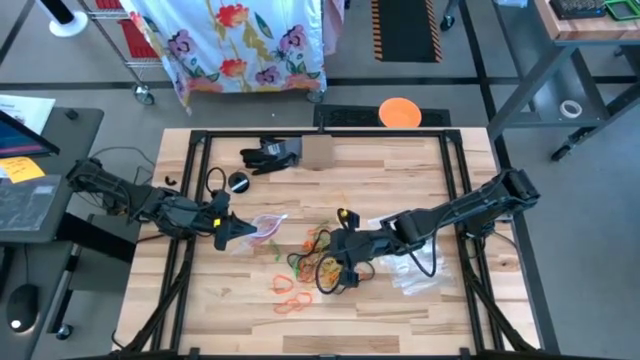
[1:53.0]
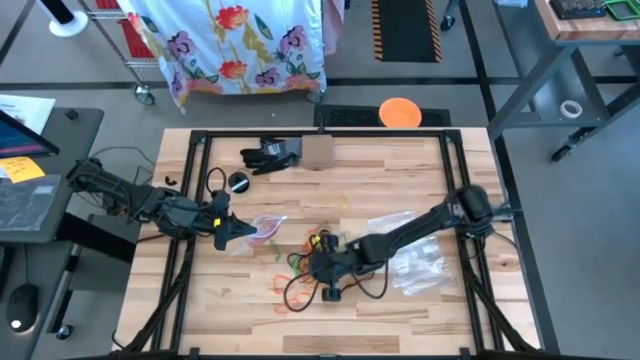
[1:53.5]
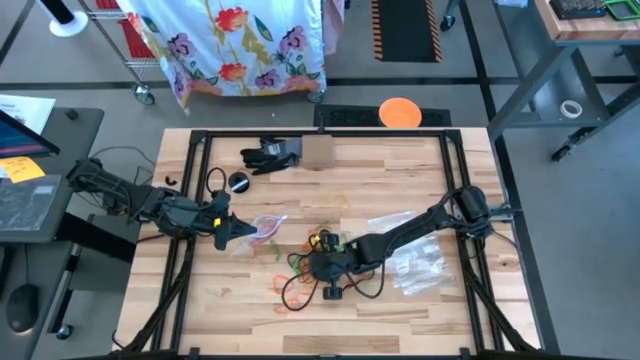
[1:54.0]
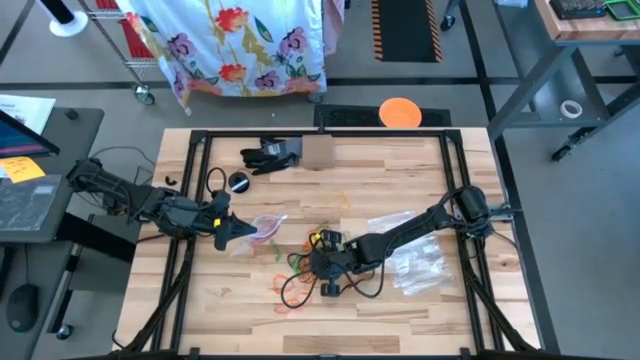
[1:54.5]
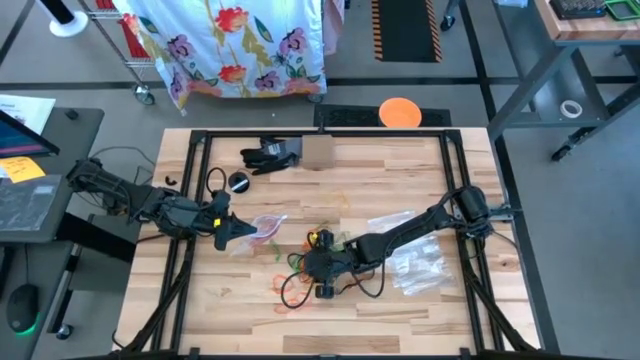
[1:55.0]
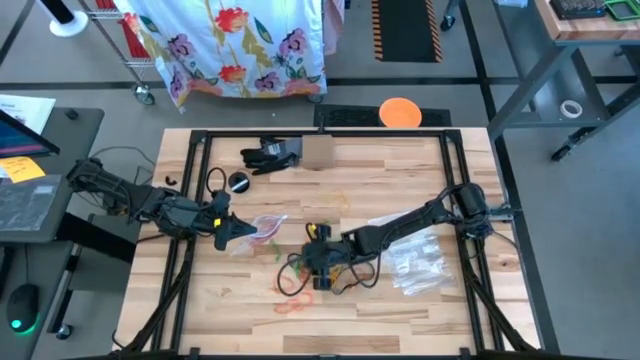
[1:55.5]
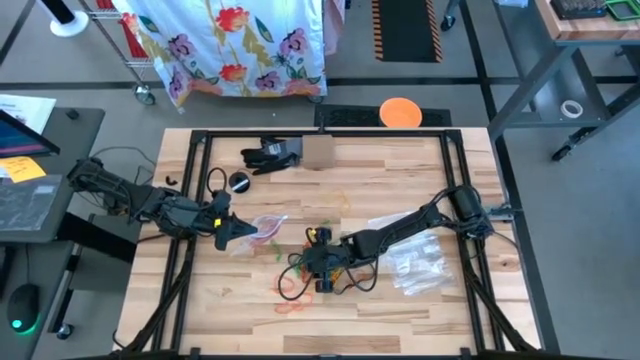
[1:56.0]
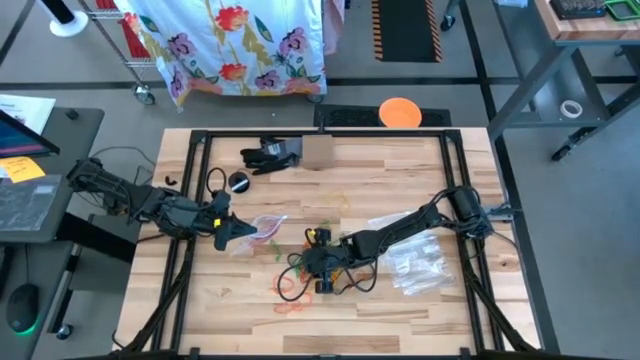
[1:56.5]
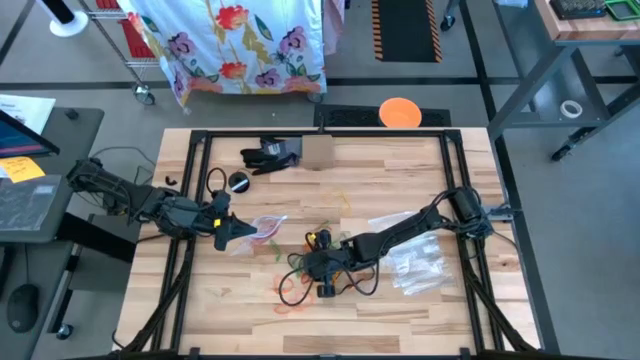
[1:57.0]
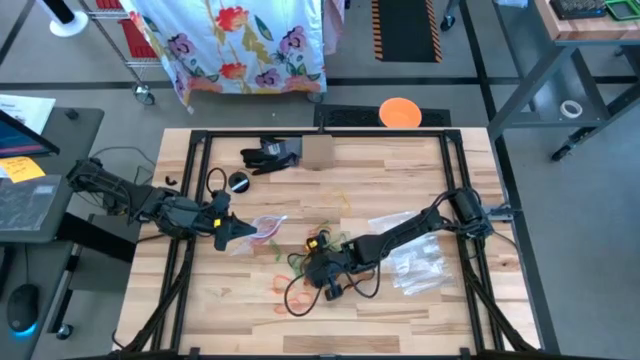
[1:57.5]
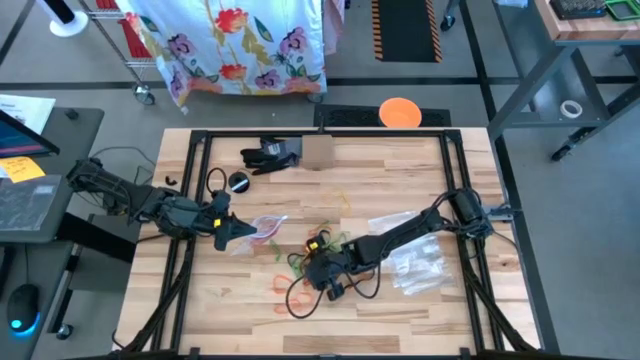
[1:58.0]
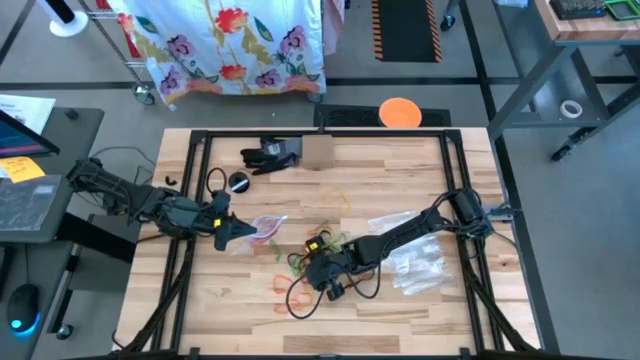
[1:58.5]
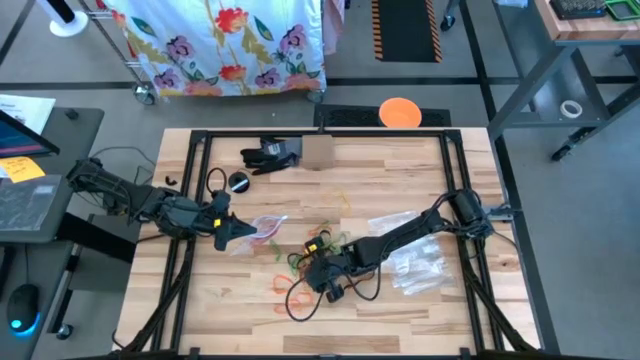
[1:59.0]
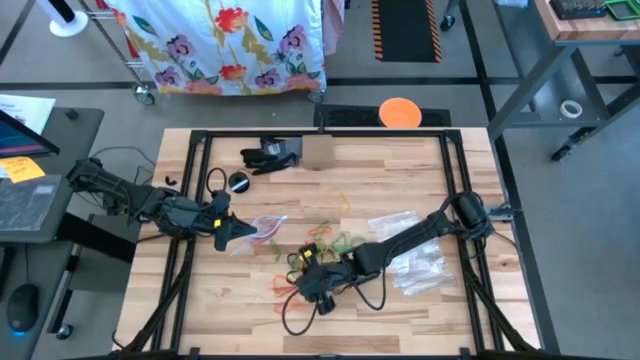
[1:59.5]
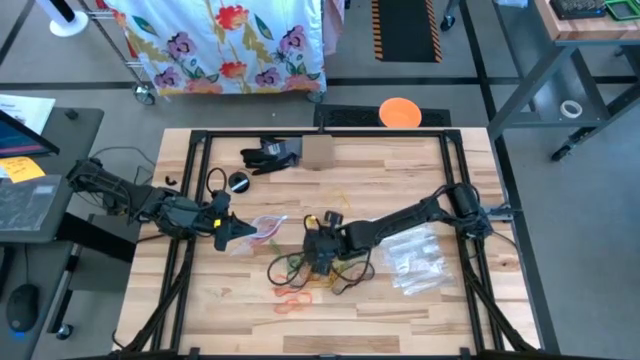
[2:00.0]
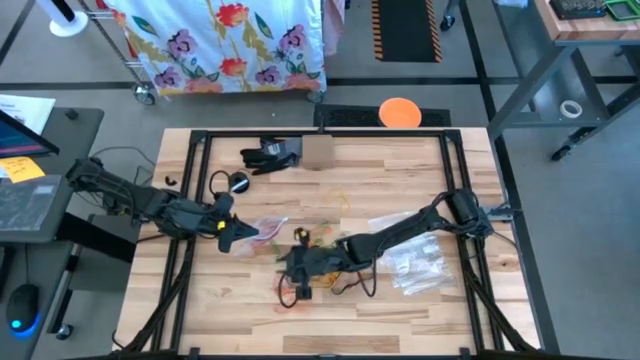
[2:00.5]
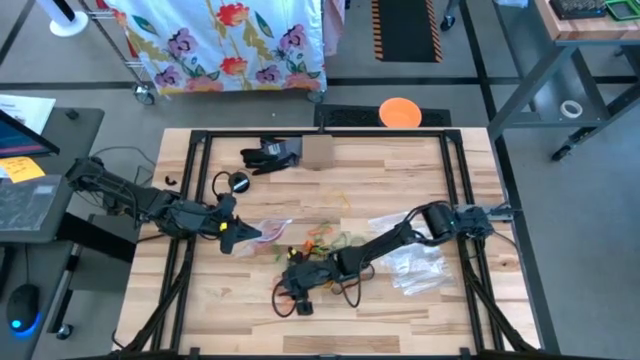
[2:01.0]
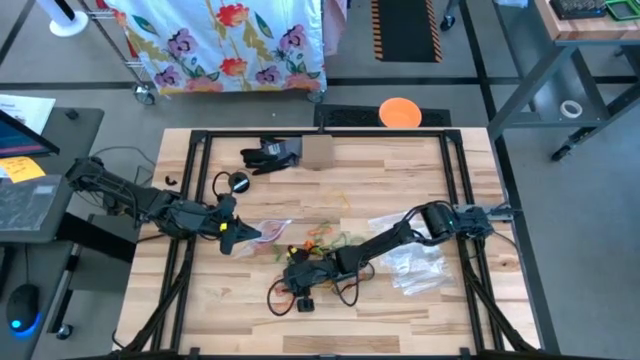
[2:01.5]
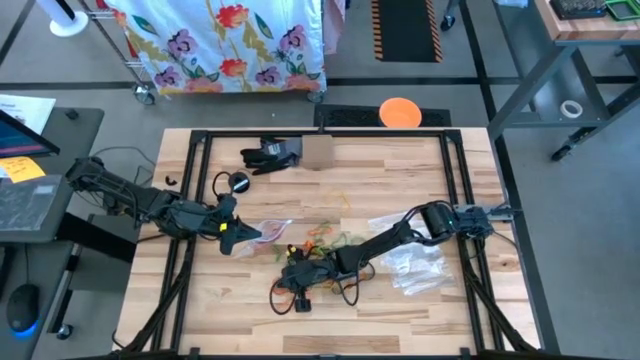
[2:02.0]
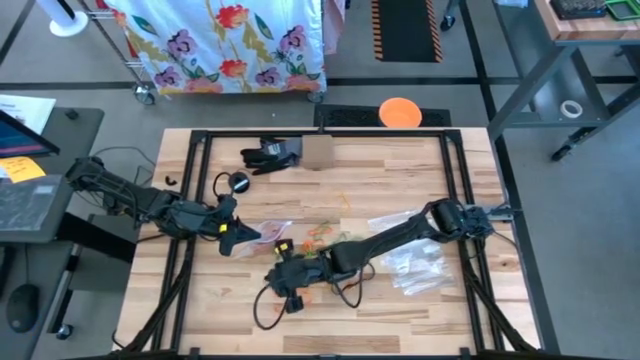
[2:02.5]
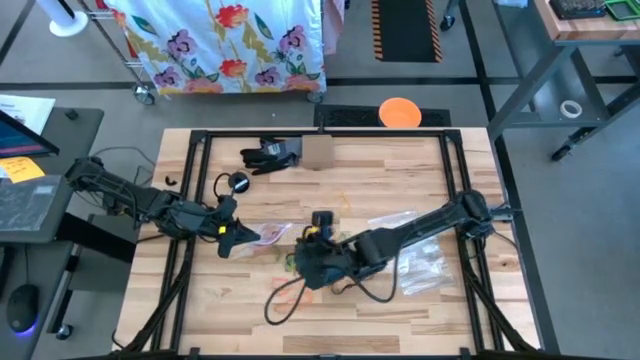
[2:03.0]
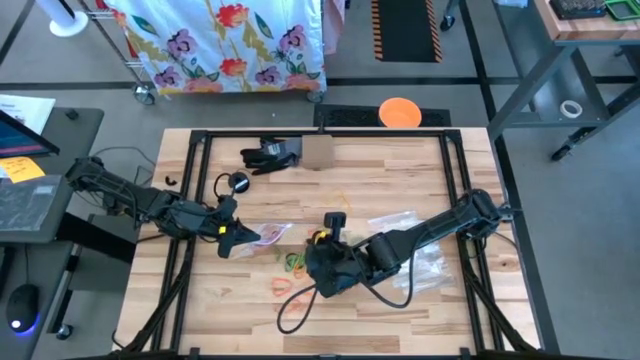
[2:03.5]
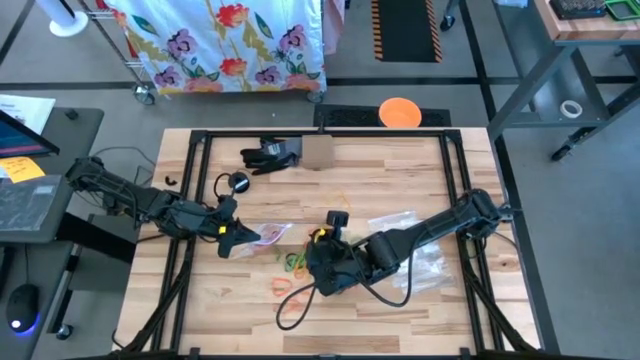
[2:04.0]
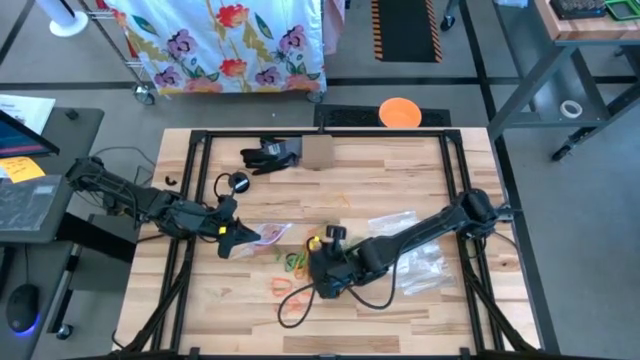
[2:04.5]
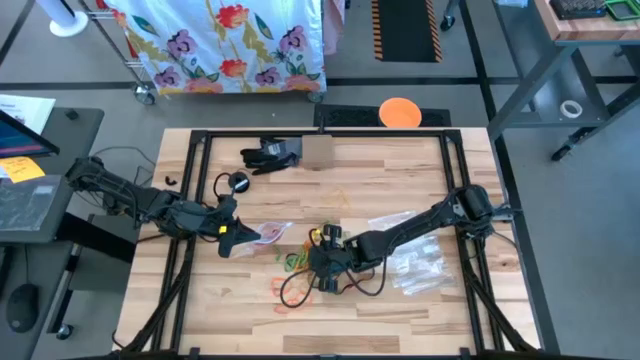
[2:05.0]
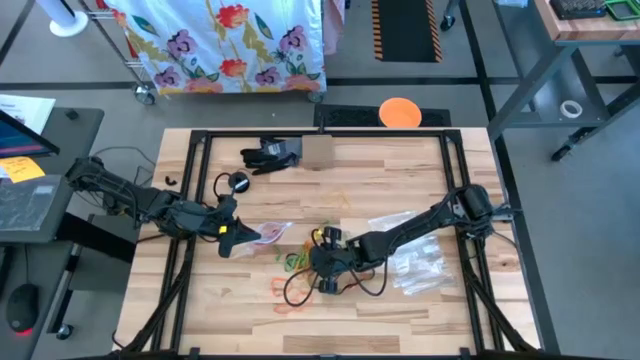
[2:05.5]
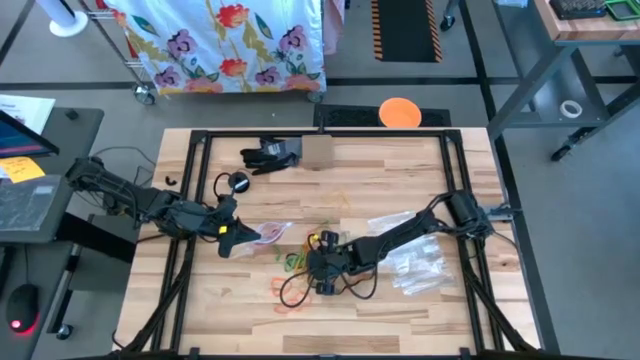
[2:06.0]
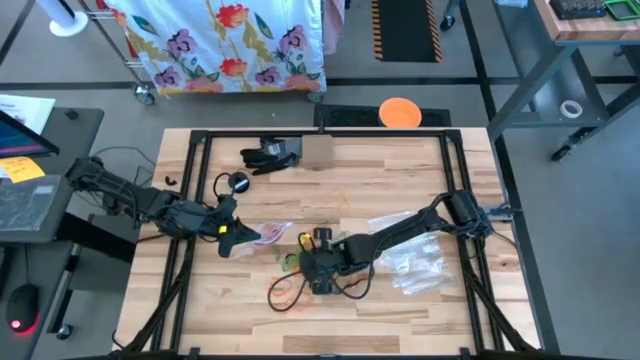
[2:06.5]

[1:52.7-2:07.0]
Task: Sort rubber bands
Put the red rubber band into the transparent zip bag

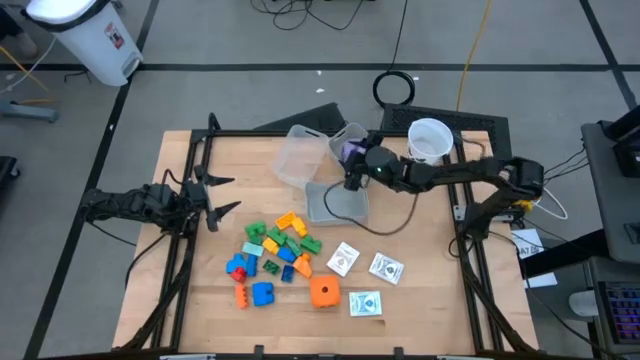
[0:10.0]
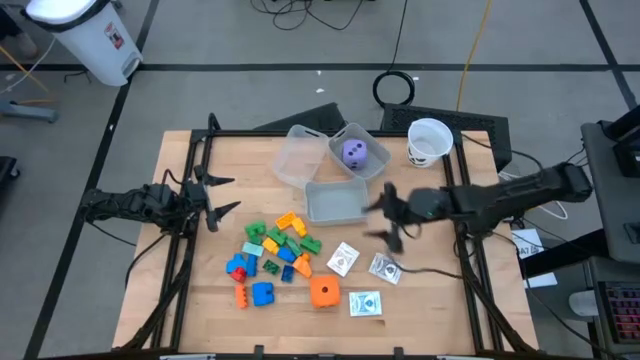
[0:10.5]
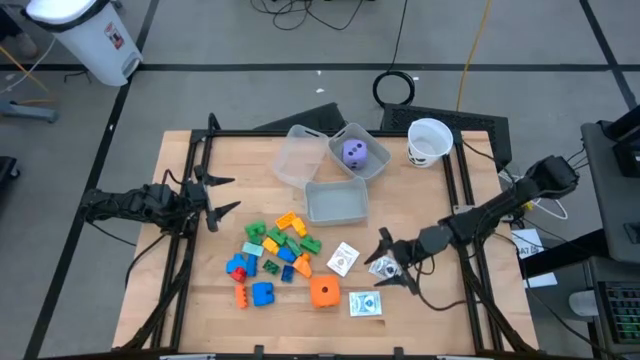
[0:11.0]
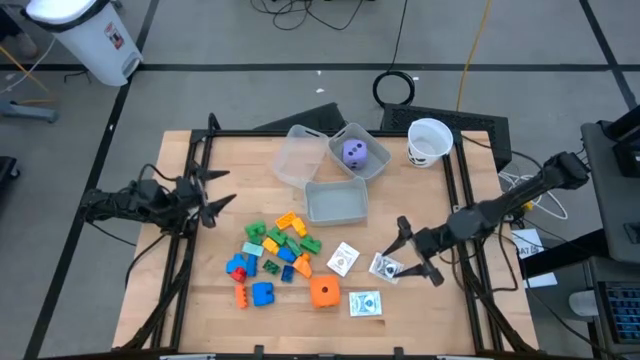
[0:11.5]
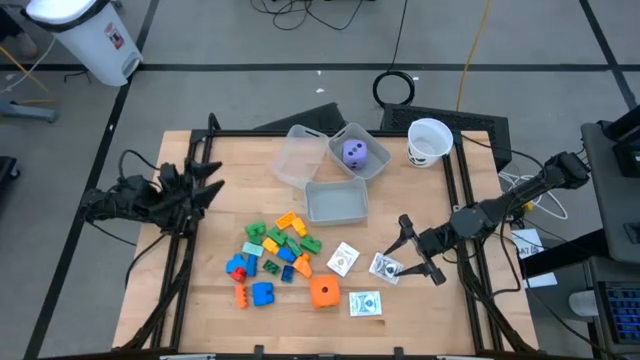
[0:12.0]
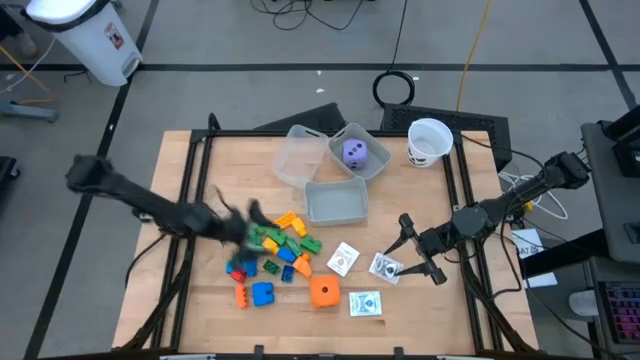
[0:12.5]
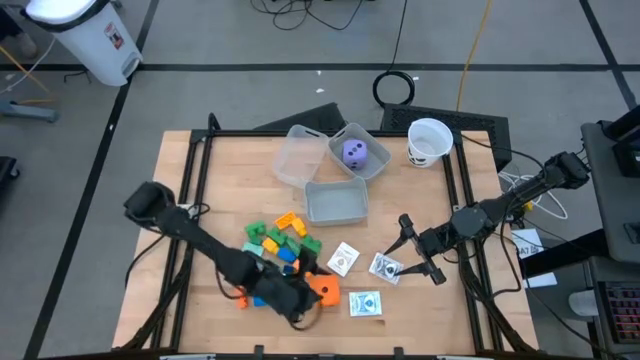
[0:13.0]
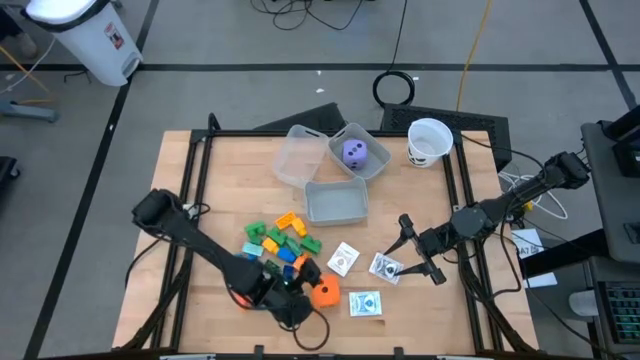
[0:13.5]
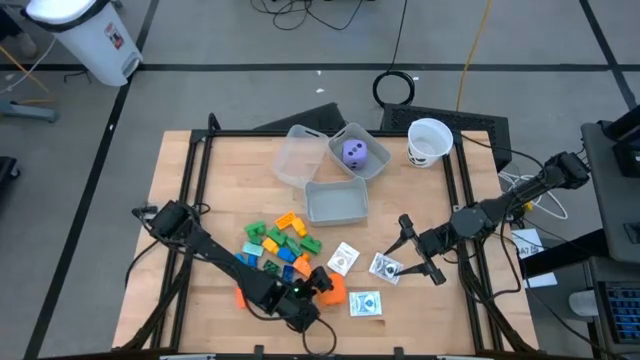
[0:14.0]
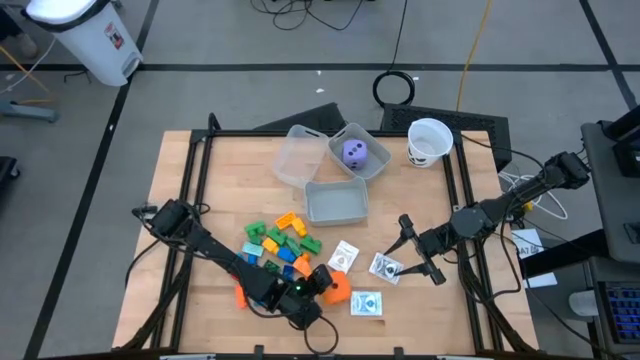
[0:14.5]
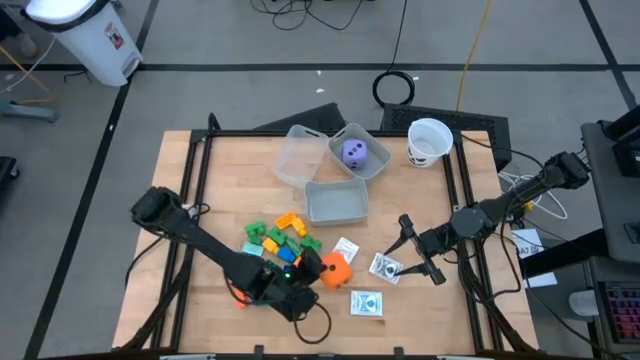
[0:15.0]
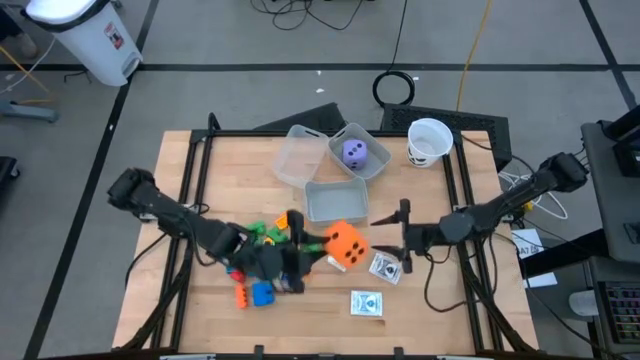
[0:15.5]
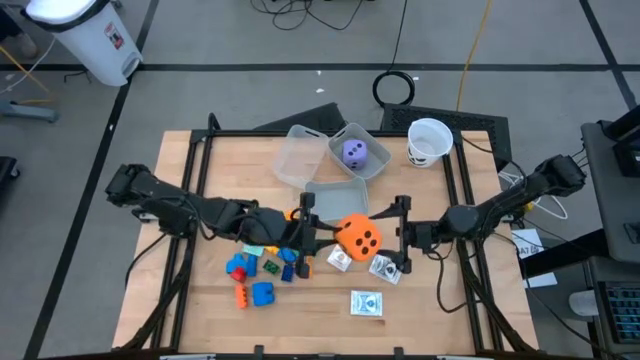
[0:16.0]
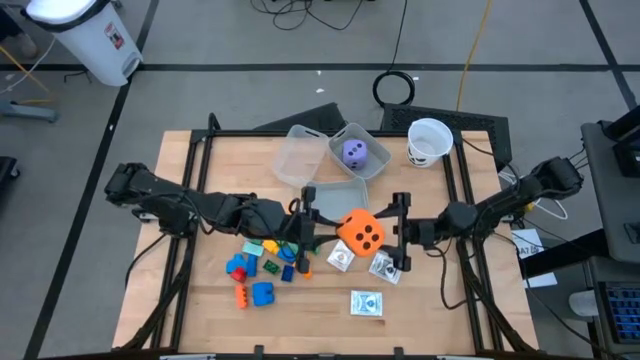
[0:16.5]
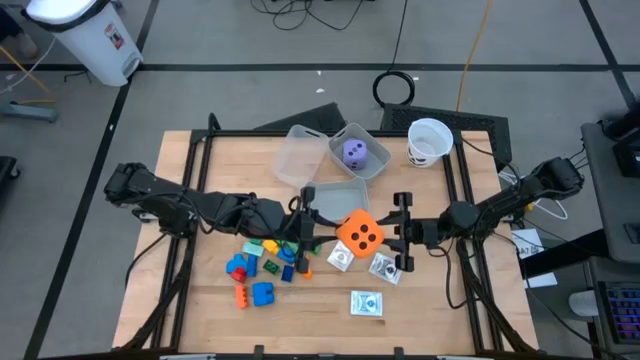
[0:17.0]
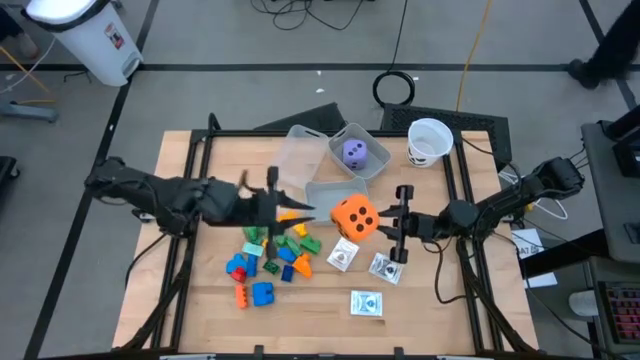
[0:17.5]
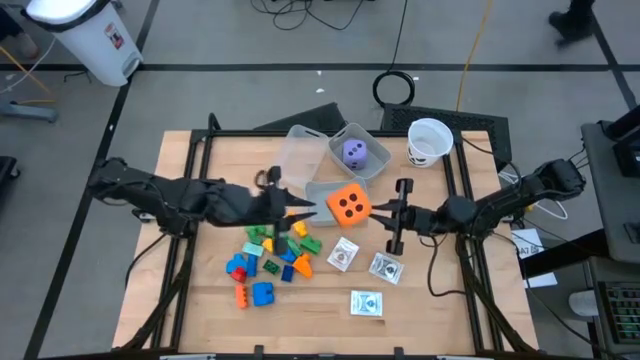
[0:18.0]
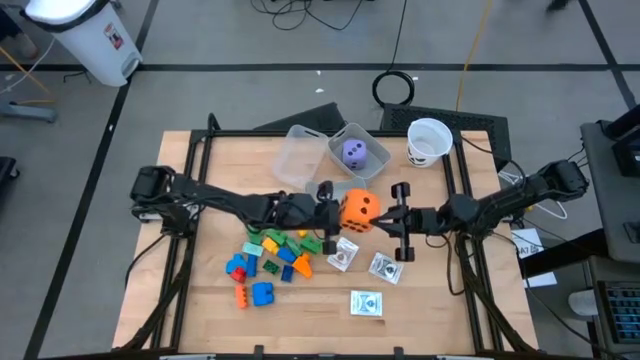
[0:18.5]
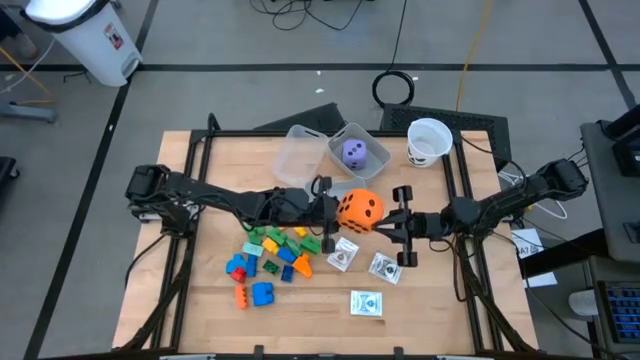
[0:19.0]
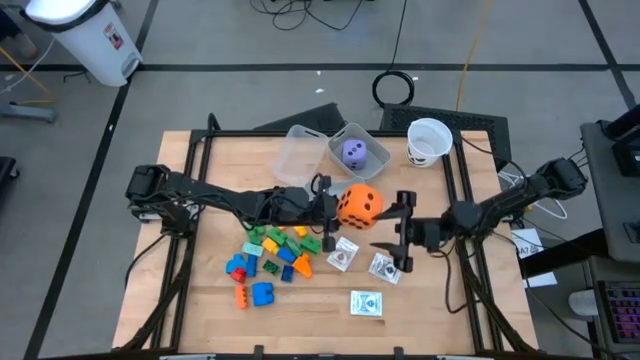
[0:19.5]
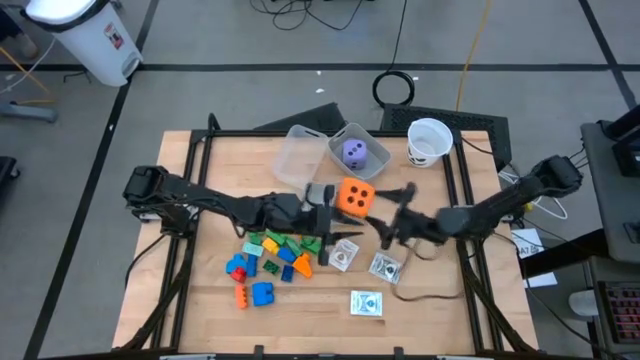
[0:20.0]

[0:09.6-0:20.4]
Task: Pick & Place Toys
Put the orange die into the top gray bin
